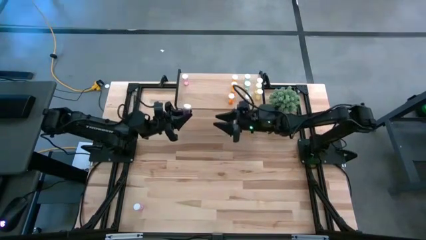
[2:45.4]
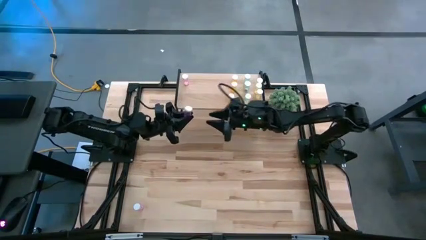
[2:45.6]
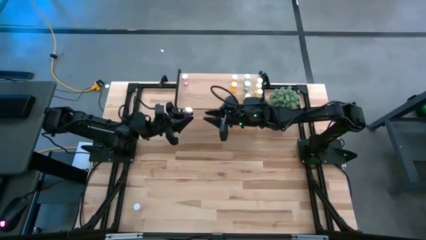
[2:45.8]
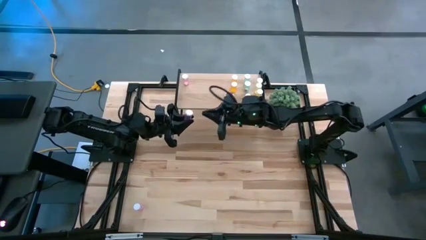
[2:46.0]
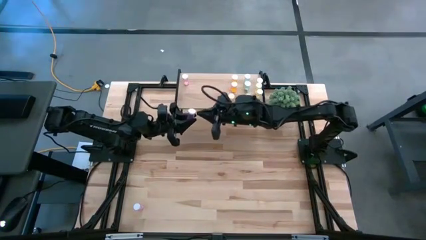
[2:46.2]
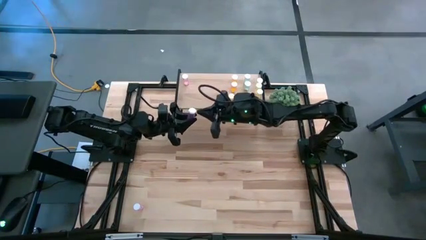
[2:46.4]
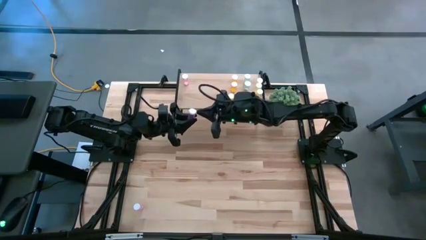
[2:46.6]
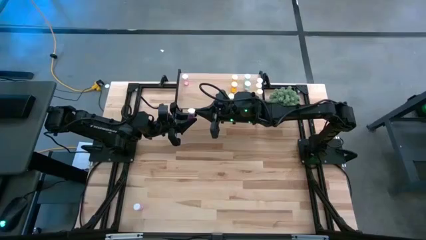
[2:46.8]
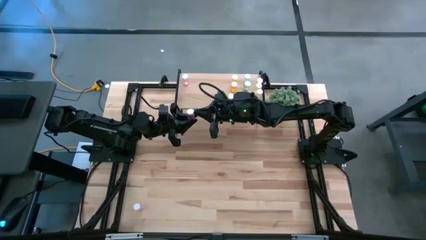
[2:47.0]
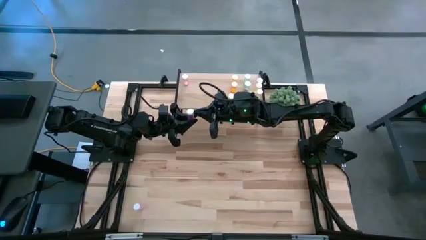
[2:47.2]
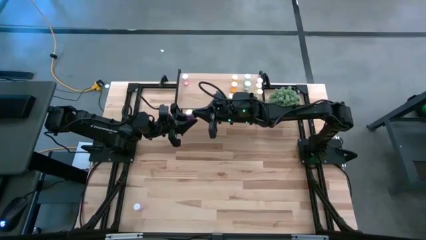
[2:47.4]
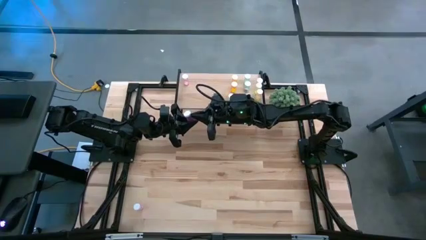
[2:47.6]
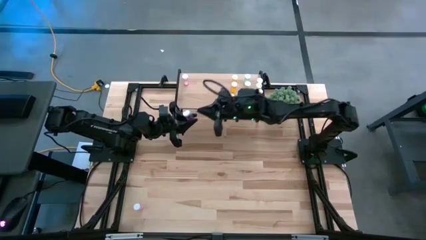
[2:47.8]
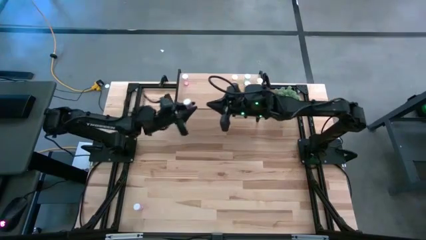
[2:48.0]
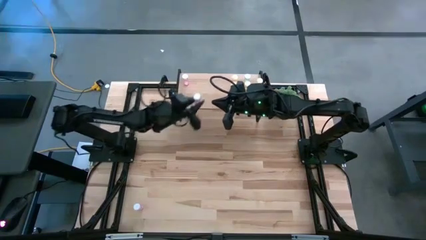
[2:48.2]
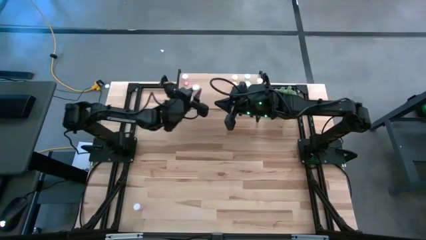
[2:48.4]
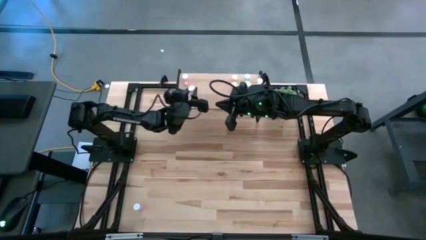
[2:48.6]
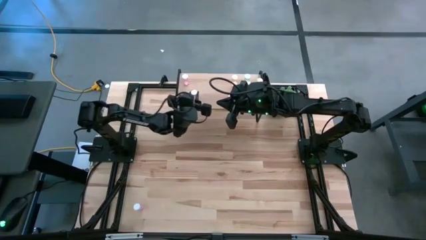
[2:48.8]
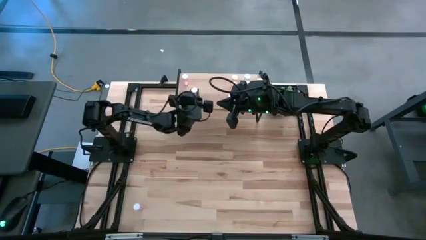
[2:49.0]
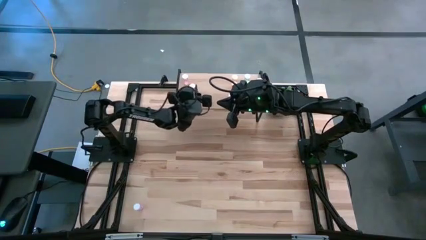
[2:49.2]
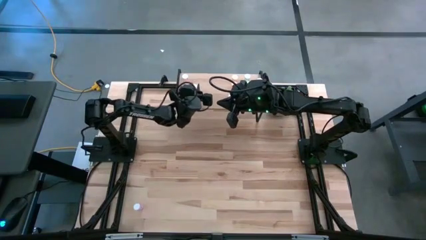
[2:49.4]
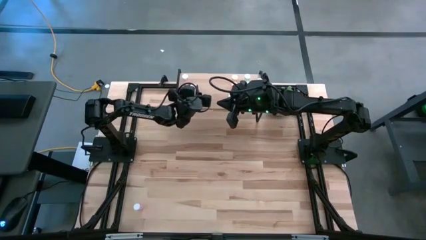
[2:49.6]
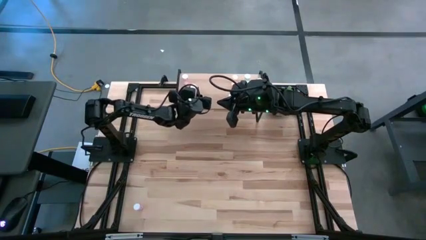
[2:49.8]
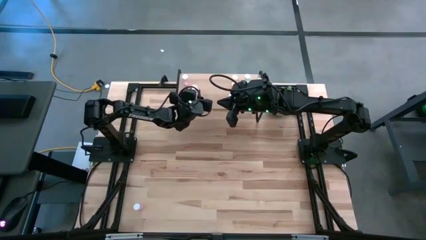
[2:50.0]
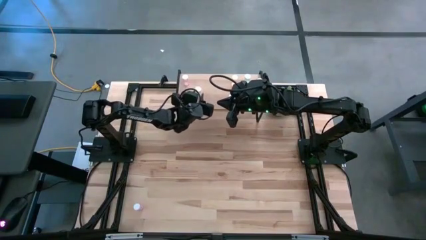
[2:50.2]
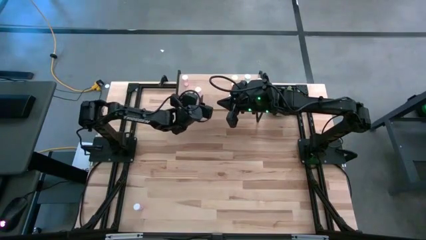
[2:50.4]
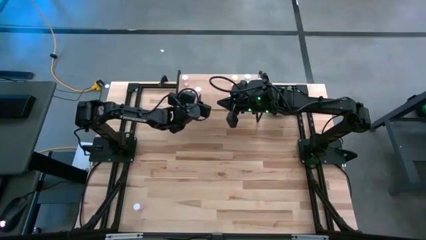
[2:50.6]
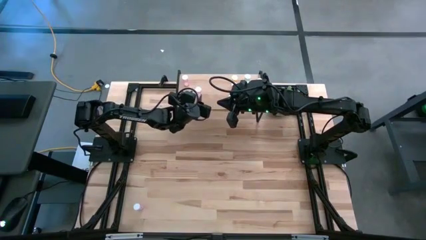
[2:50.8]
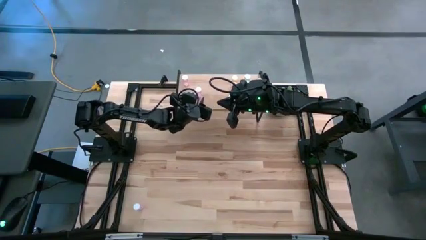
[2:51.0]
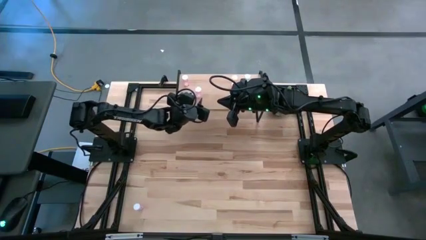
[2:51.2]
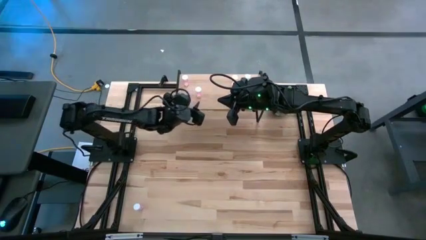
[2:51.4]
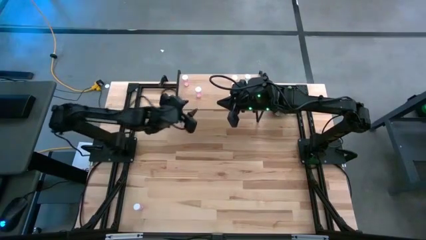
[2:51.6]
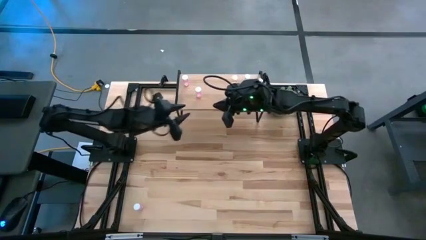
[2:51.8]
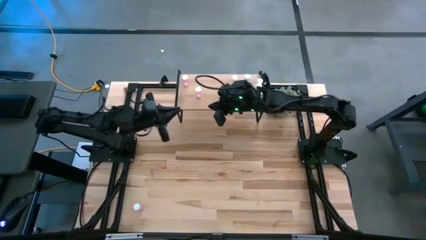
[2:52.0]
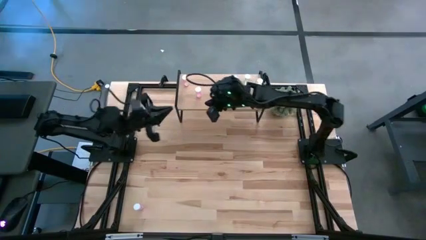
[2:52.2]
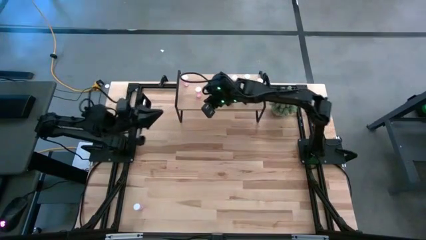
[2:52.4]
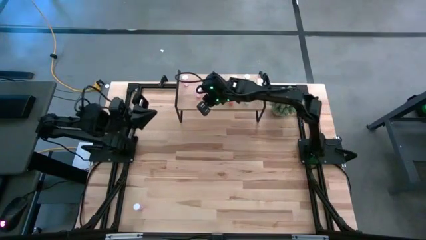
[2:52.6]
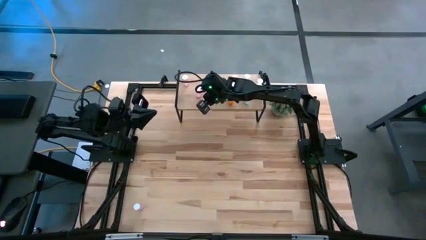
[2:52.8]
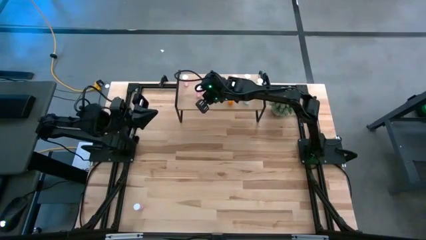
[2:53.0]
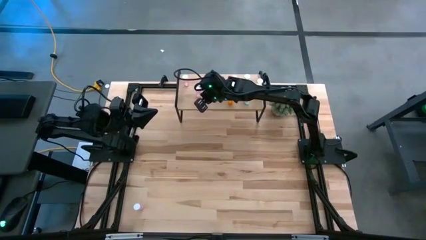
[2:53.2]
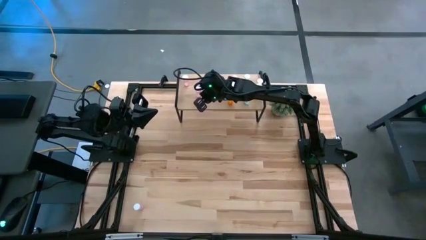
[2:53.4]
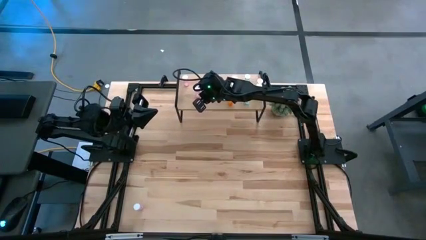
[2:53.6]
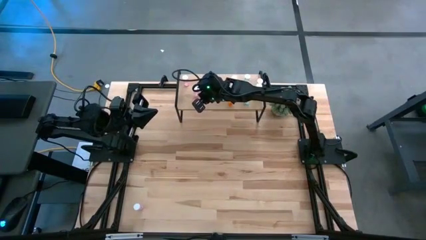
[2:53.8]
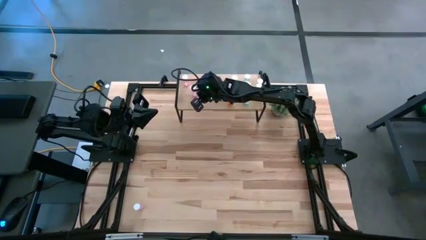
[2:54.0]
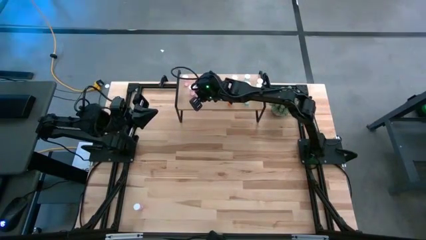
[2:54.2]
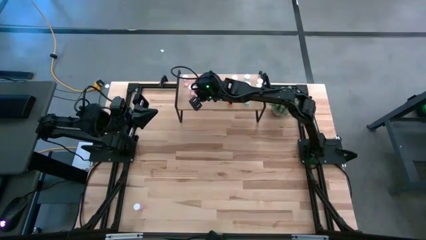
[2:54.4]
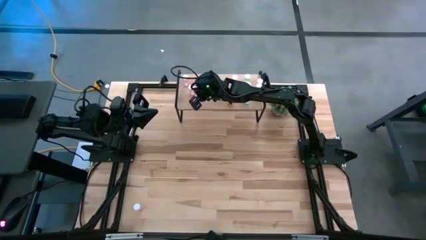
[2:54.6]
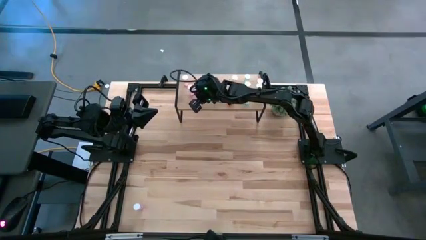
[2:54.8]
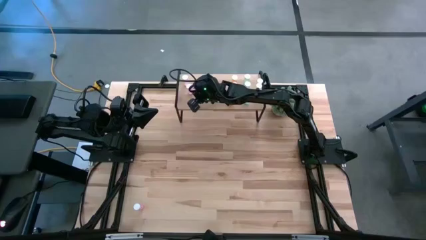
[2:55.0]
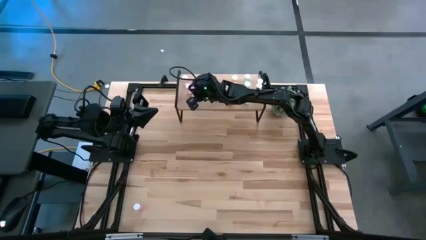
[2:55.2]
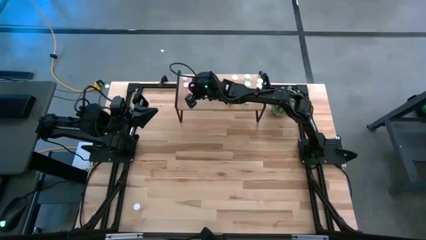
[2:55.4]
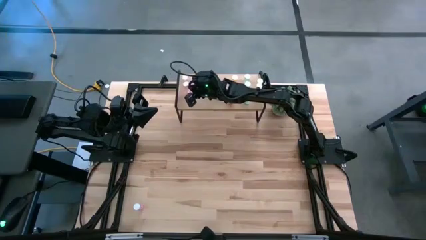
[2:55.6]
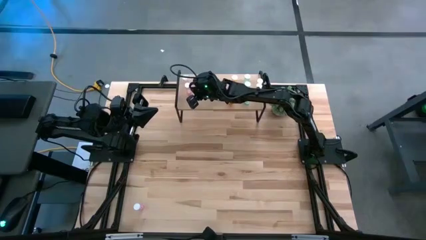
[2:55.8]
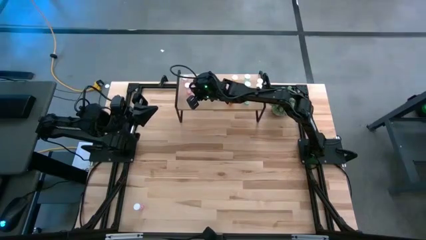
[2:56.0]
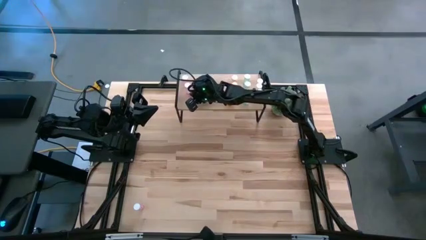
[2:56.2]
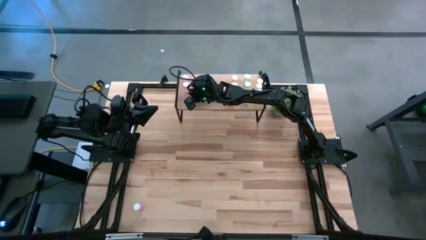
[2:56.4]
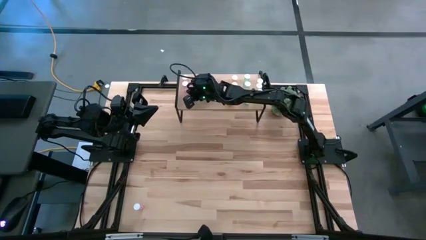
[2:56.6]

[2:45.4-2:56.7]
Task: Pick and place medicine bottles onto shelf by color
Put the right pink pill bottle onto the shelf aligned with the other pink pill bottle
